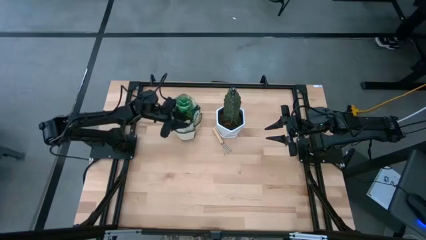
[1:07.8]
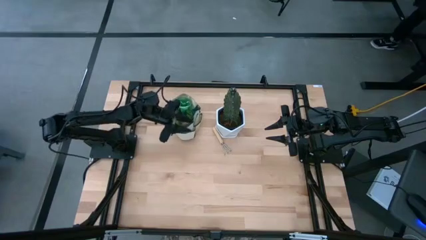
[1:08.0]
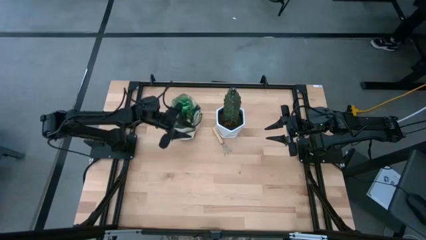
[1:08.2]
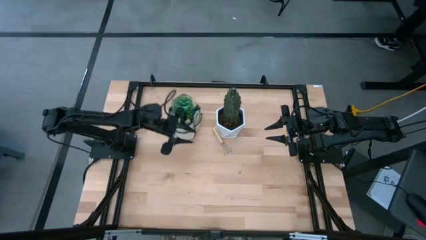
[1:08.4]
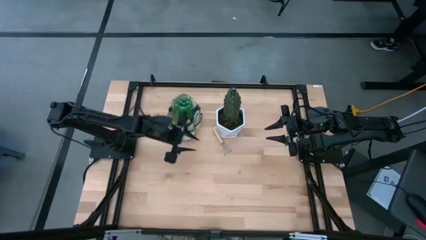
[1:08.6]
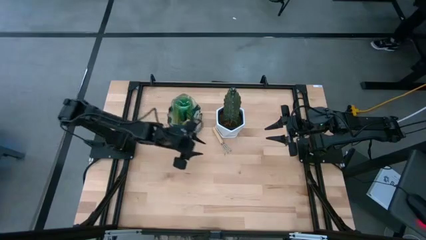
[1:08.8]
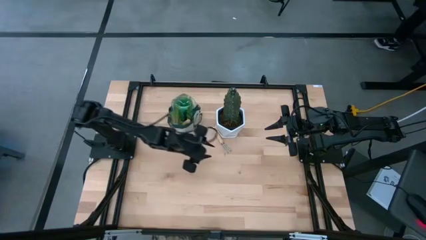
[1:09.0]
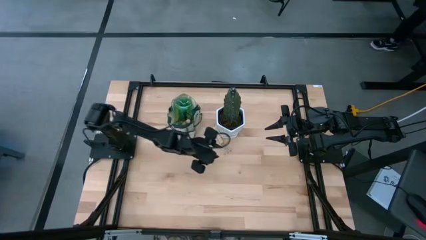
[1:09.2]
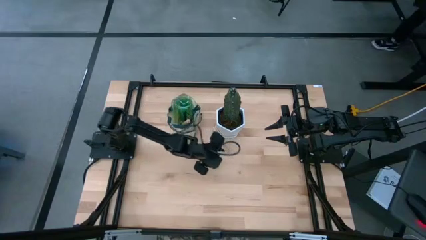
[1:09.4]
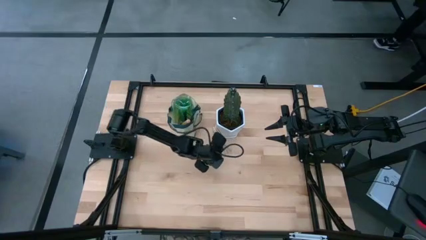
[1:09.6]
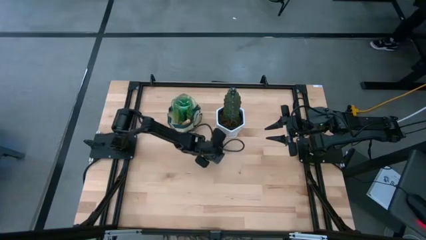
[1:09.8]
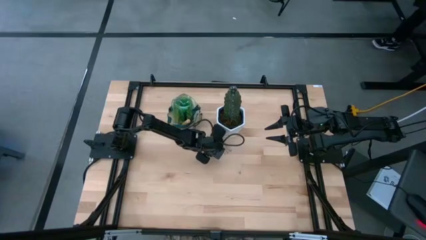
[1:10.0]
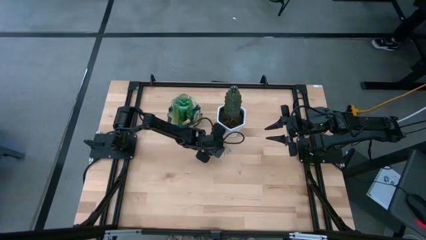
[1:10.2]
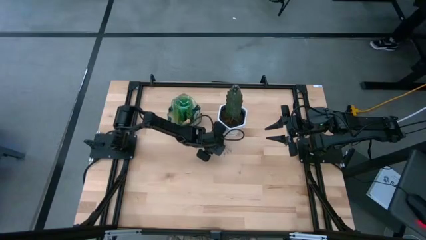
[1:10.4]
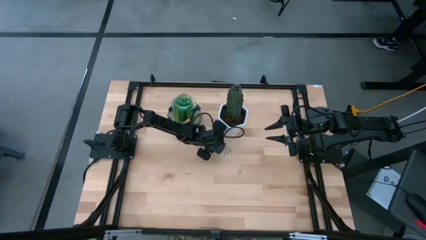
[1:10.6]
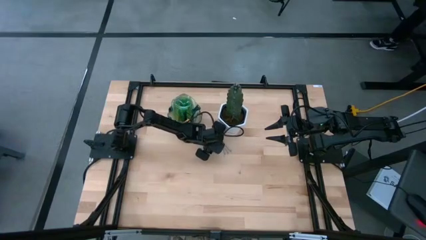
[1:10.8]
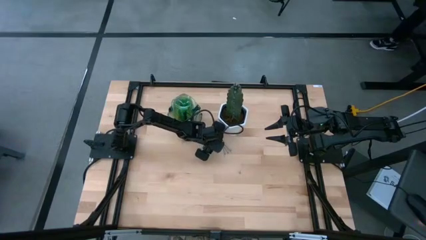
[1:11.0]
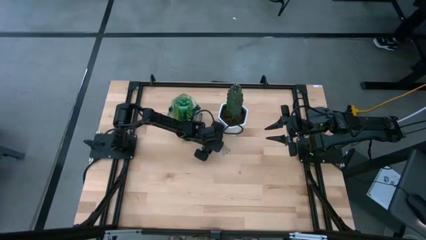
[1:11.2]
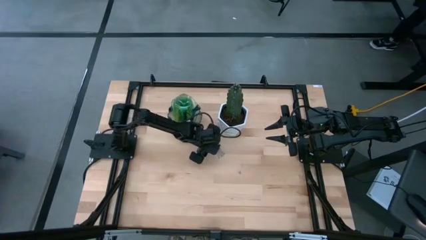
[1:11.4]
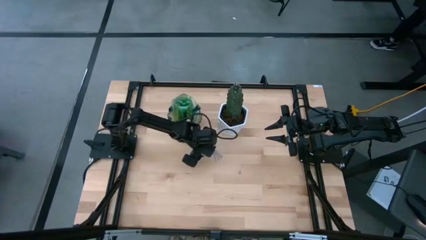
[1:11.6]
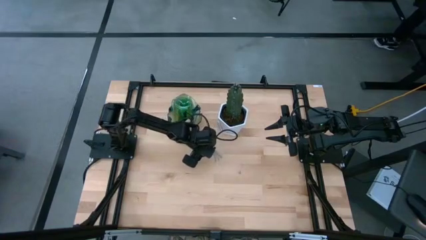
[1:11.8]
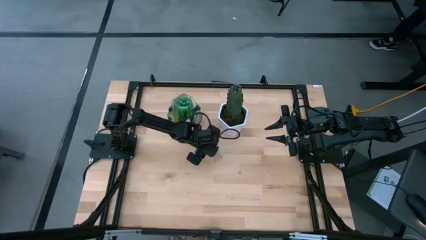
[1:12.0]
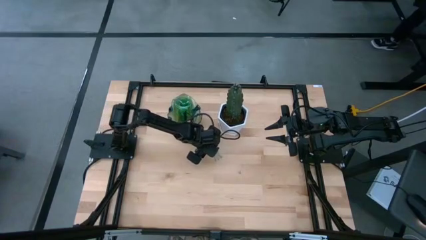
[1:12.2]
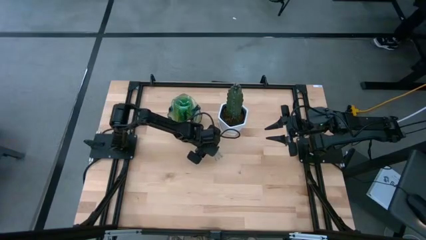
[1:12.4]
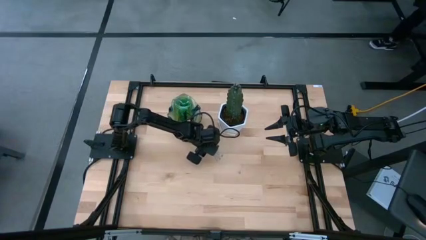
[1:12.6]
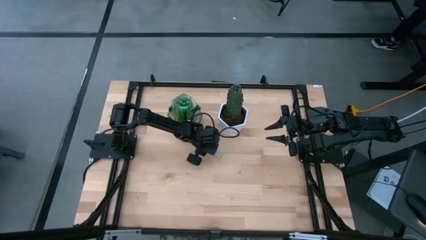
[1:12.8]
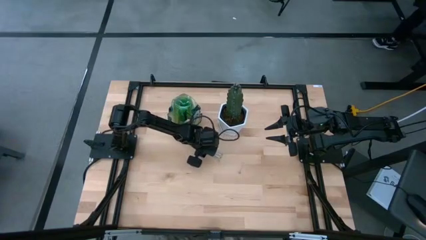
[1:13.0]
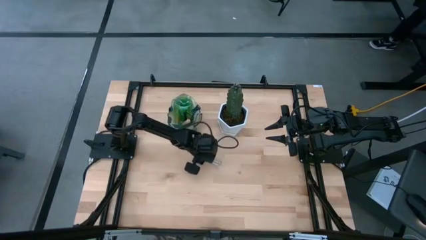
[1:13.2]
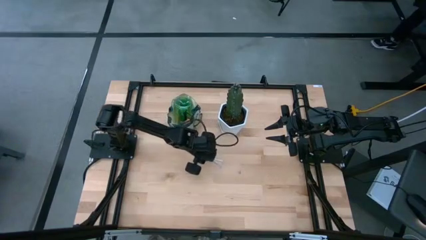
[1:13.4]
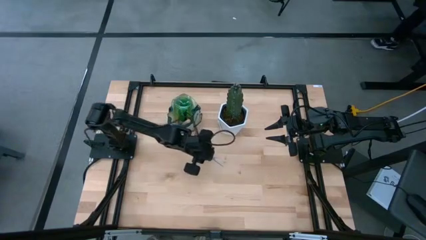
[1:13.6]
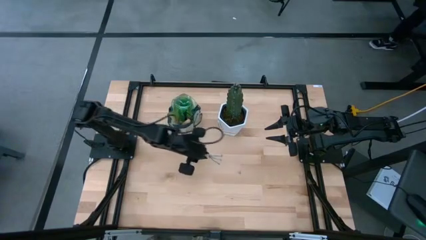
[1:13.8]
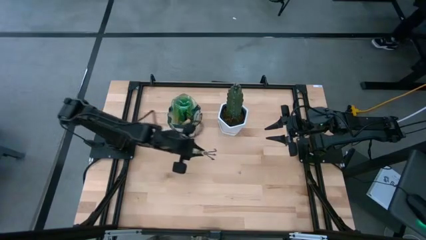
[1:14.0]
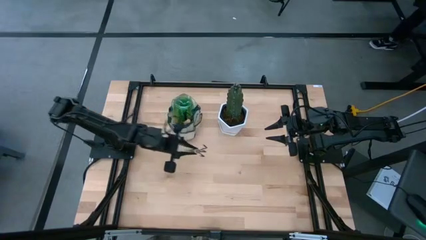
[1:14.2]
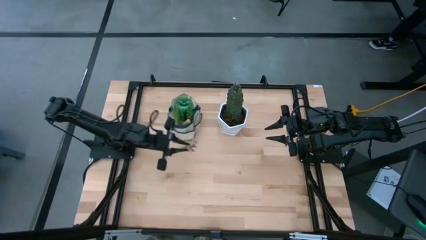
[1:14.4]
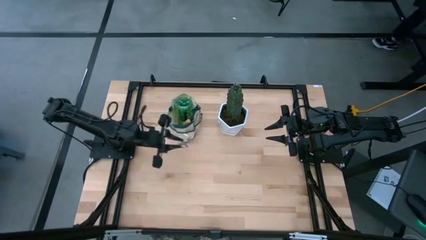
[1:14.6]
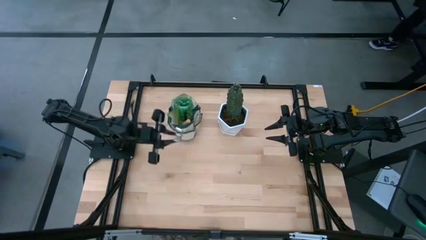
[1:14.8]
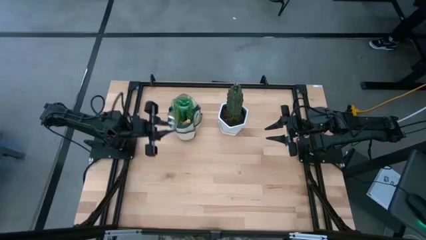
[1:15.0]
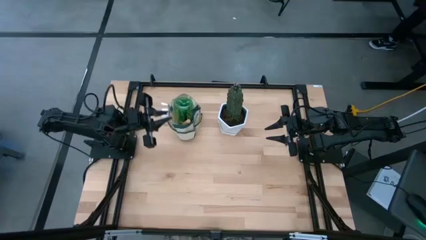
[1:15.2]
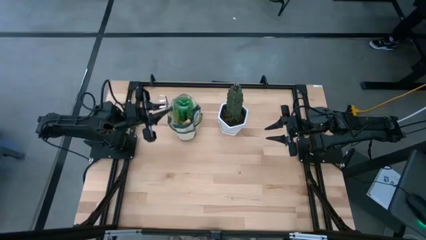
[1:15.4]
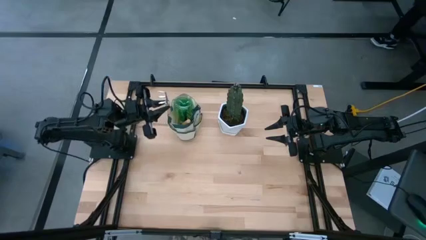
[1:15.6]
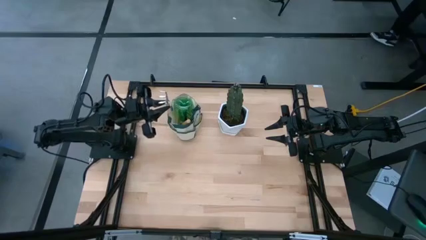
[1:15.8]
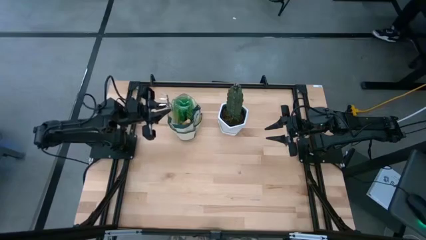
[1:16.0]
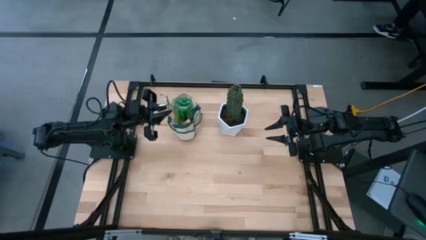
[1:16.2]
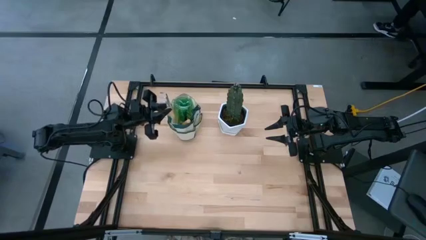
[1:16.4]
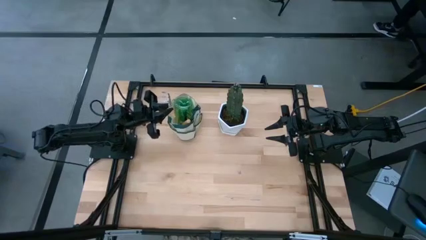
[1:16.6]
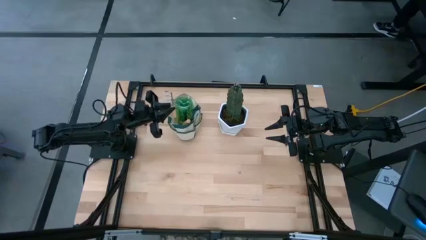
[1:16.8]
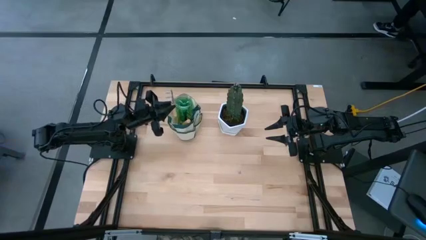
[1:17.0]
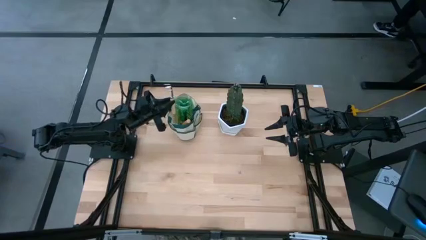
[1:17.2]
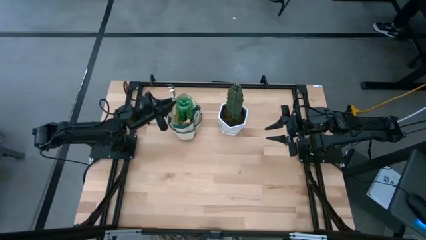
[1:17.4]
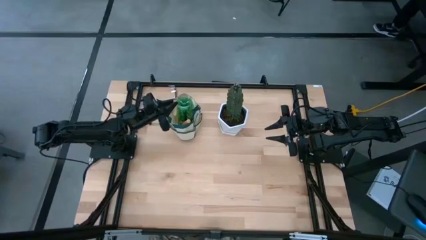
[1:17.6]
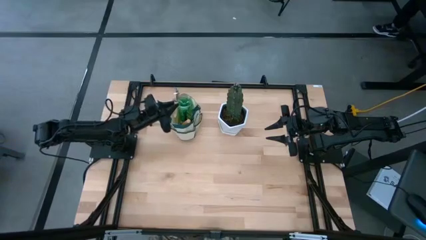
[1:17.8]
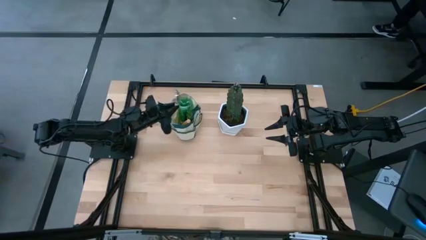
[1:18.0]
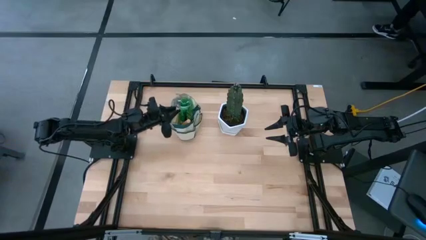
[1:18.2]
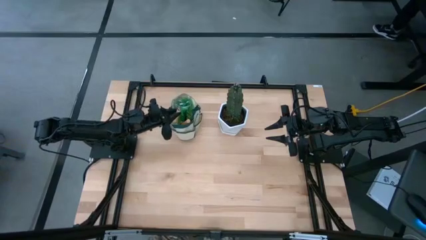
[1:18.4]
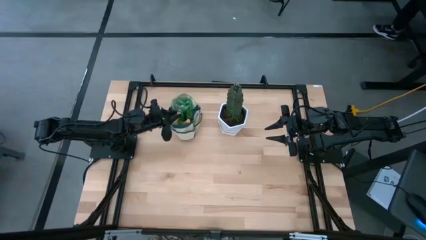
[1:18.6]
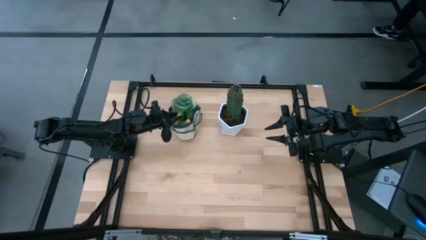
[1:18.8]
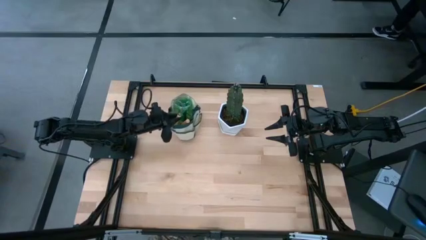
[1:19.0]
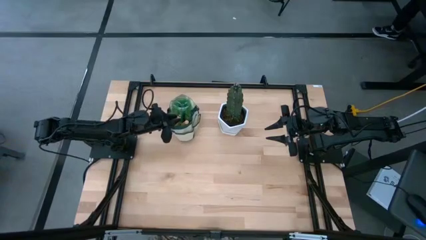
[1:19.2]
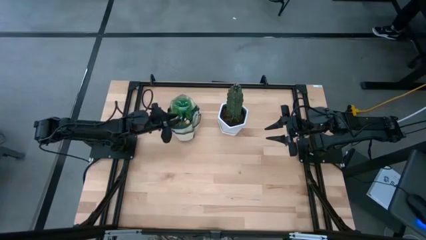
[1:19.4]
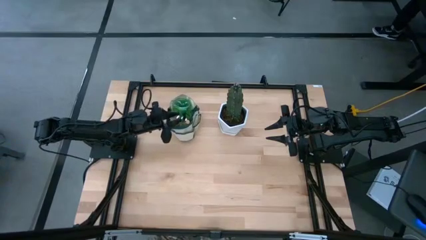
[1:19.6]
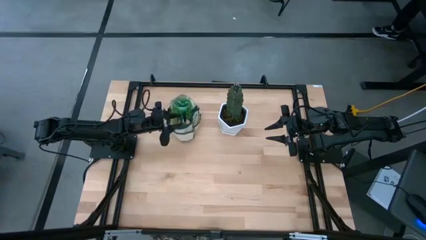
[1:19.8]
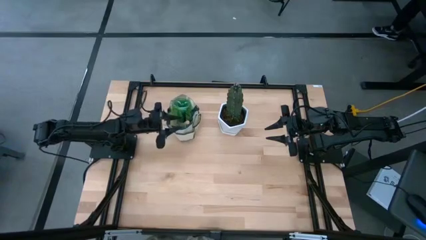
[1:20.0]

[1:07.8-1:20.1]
Task: Pick & Place Garden tools in Gardening bag
Put the brown hand rake into the brown gardening bag

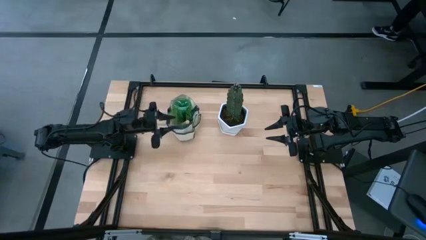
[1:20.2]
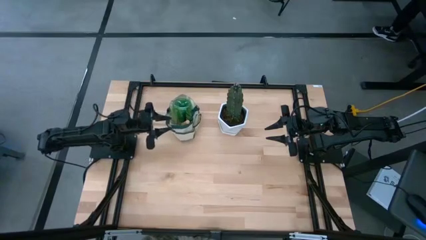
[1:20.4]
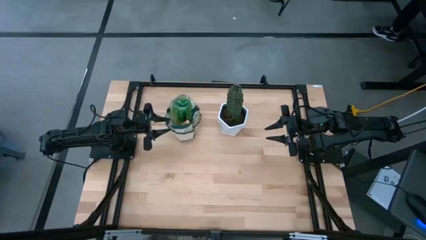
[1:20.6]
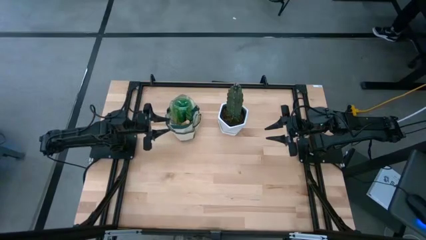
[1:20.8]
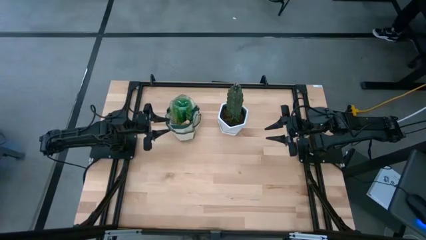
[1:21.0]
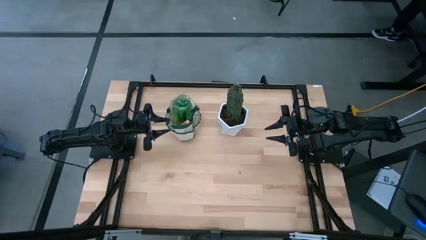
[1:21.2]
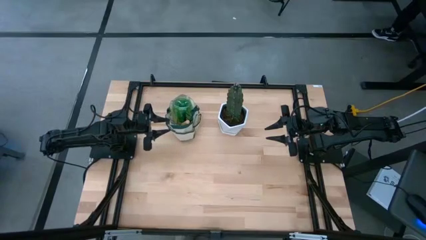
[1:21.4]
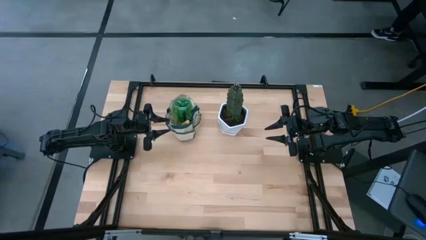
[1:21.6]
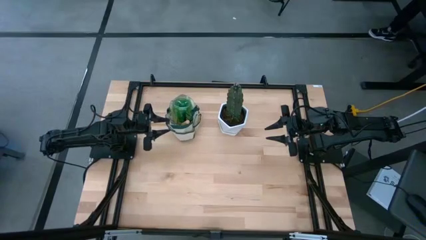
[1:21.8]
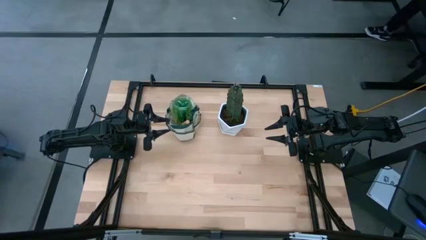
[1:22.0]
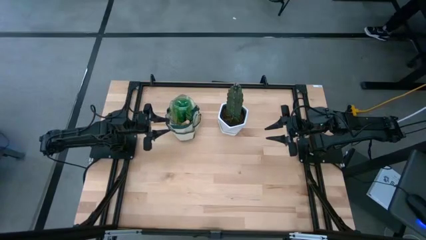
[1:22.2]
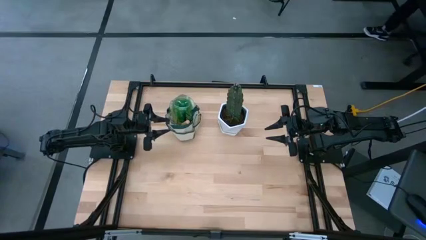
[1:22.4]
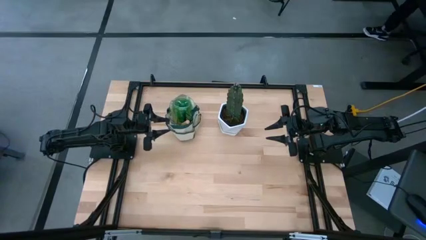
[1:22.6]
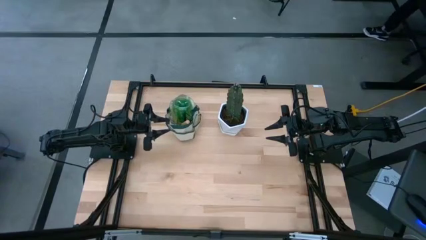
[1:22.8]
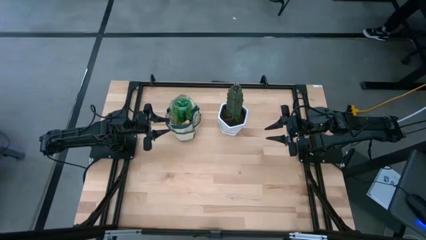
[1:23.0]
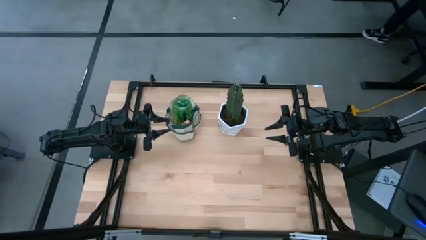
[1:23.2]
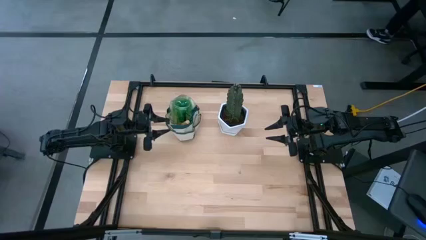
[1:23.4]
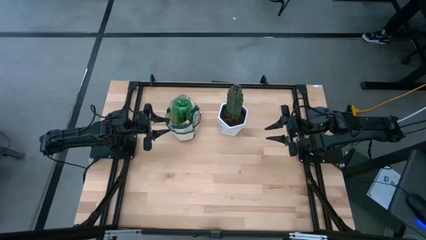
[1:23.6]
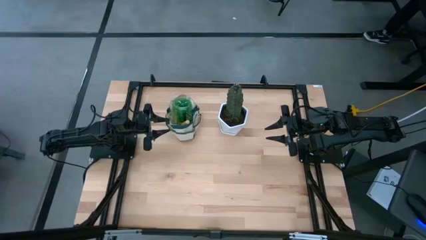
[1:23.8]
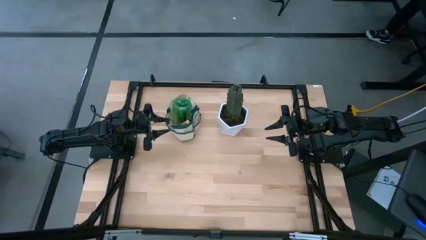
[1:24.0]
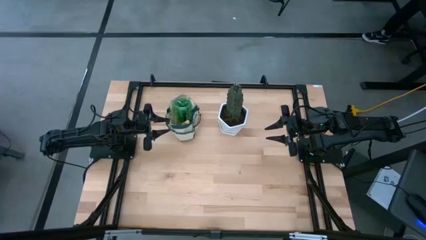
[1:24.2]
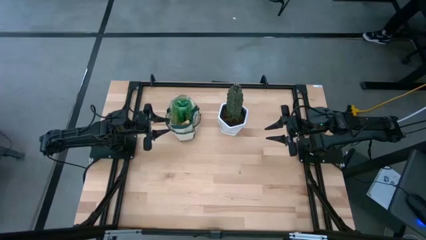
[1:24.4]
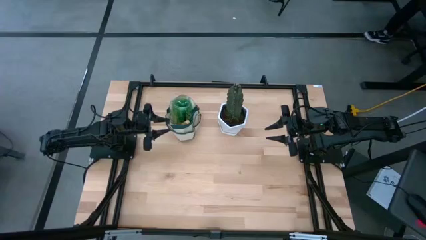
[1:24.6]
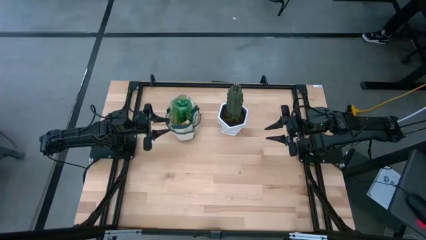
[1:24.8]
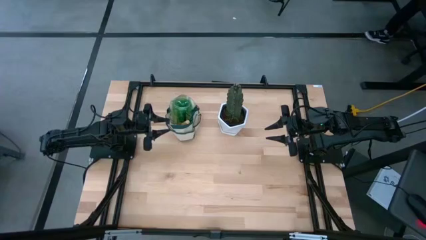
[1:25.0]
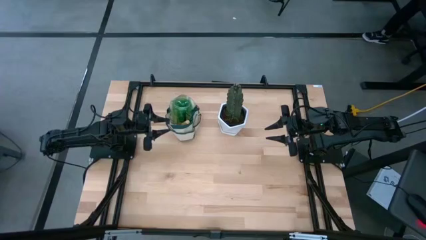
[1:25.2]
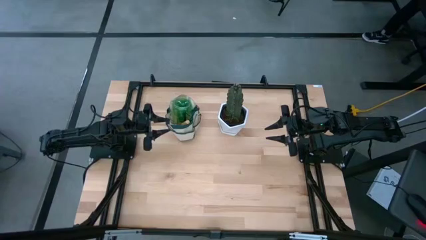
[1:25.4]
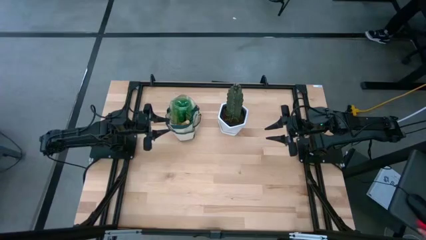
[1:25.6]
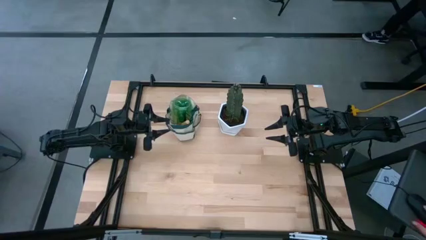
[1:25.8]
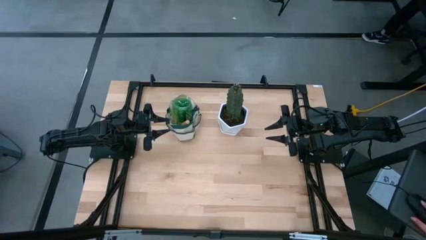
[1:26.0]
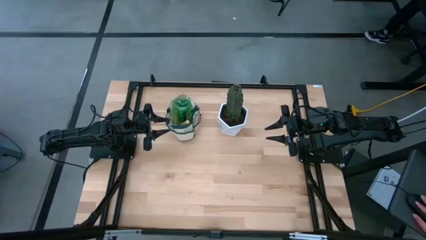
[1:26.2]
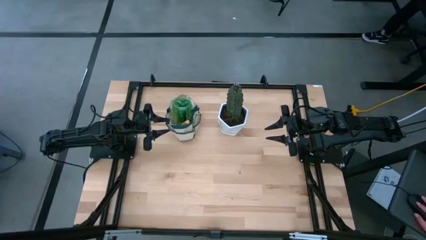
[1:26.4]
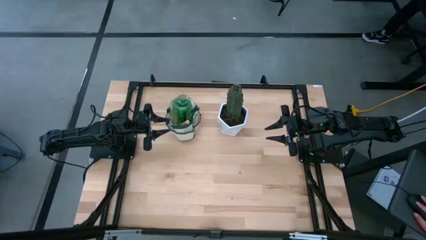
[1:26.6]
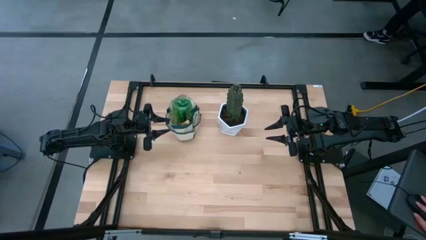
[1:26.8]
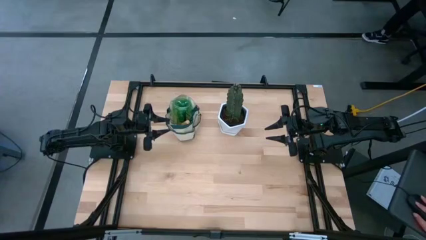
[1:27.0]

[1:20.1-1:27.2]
Return to Home Position
